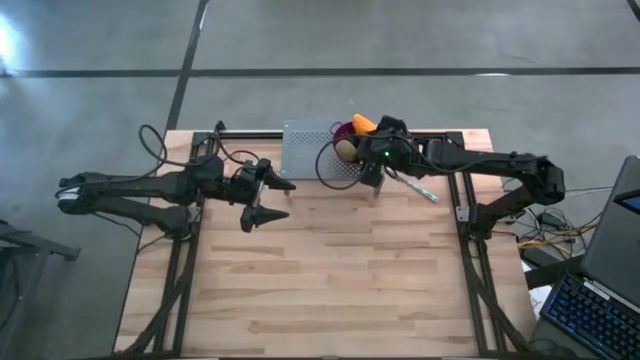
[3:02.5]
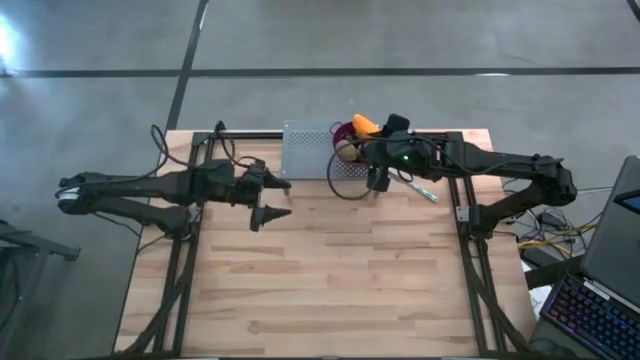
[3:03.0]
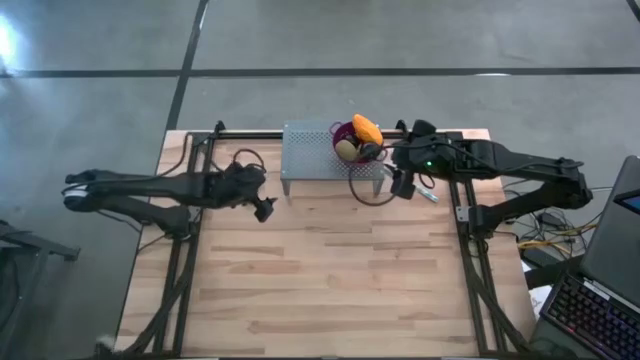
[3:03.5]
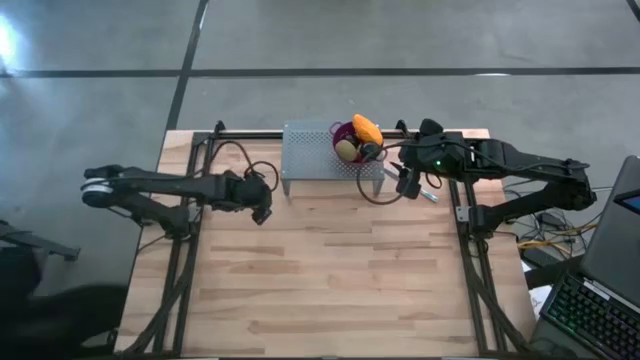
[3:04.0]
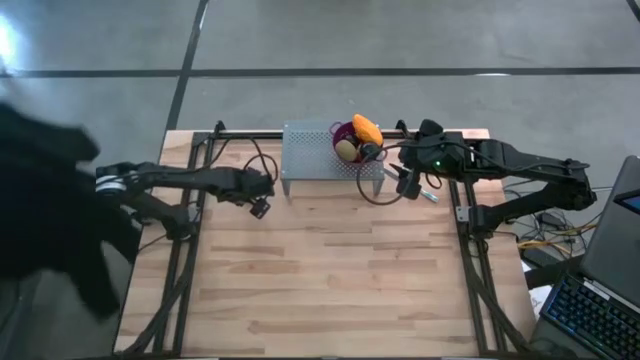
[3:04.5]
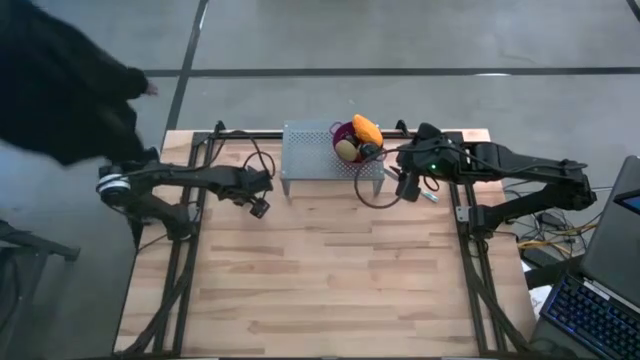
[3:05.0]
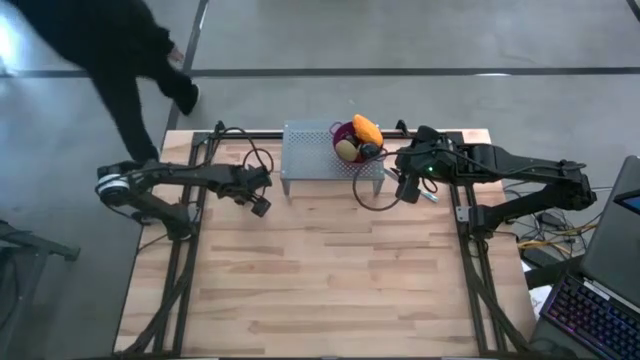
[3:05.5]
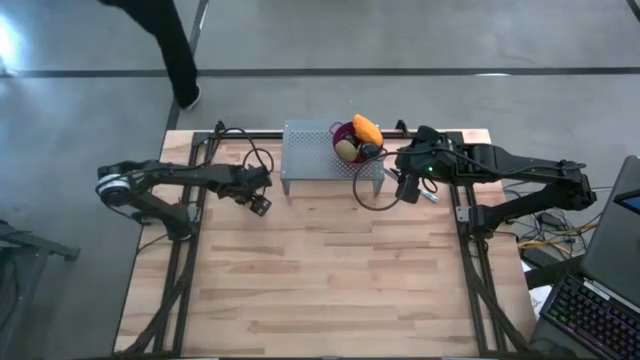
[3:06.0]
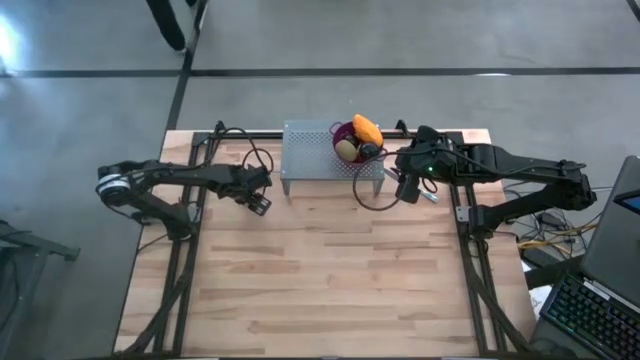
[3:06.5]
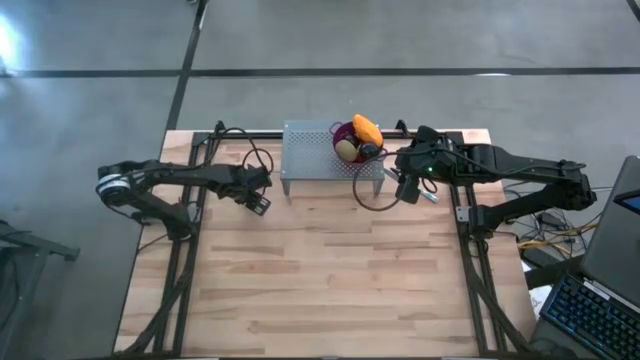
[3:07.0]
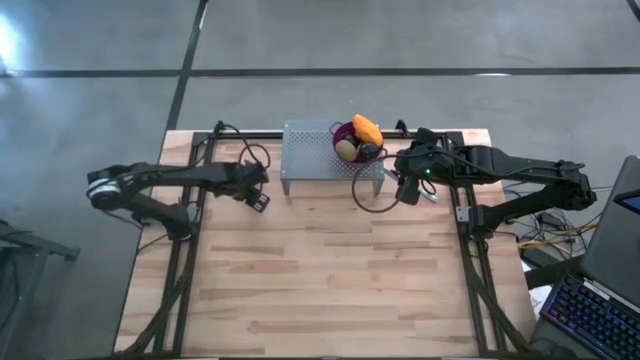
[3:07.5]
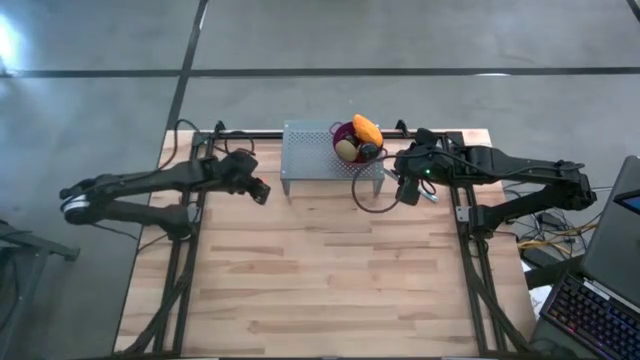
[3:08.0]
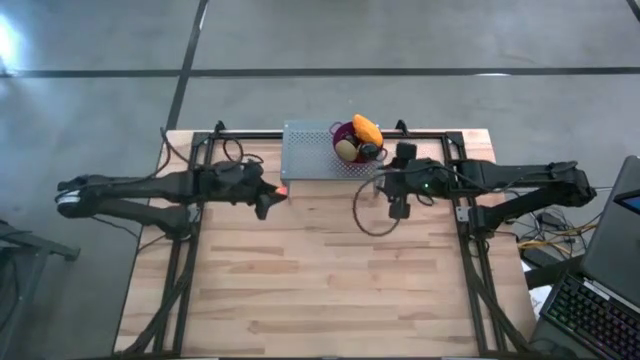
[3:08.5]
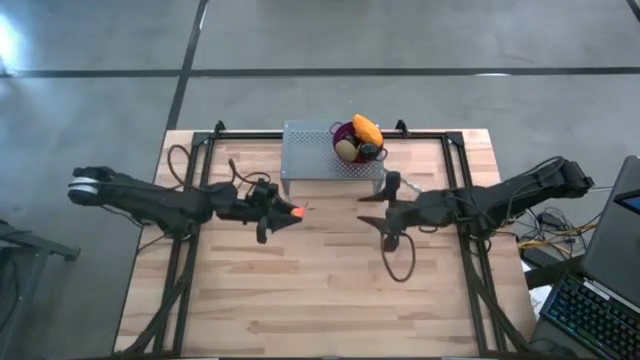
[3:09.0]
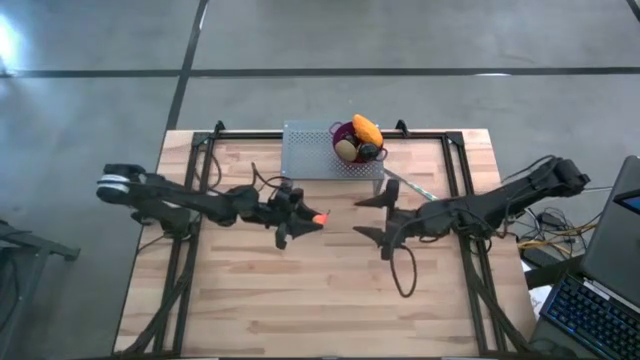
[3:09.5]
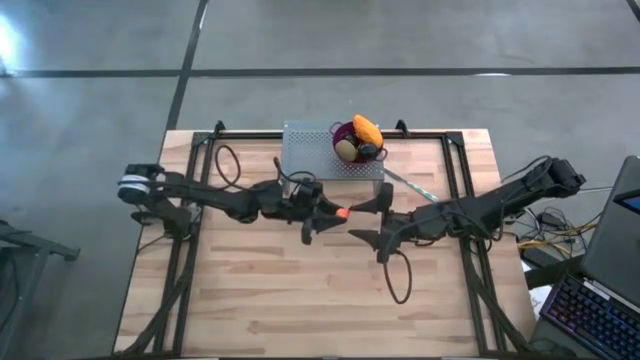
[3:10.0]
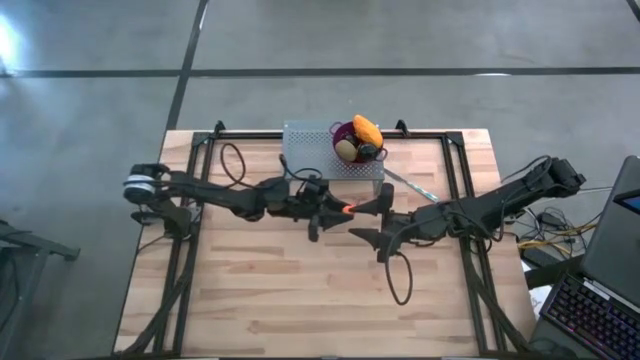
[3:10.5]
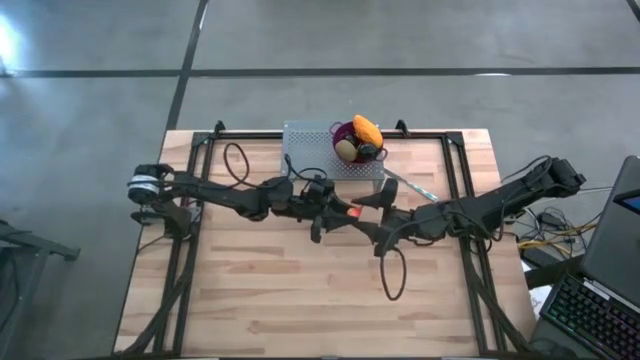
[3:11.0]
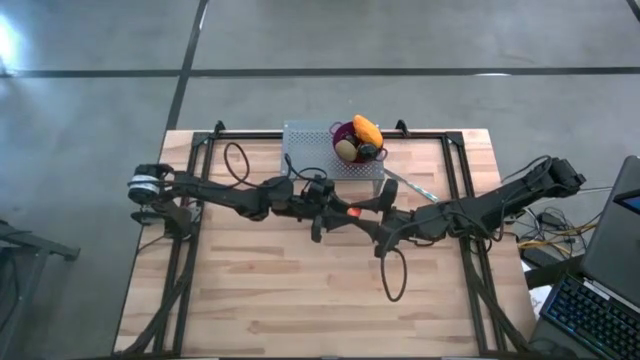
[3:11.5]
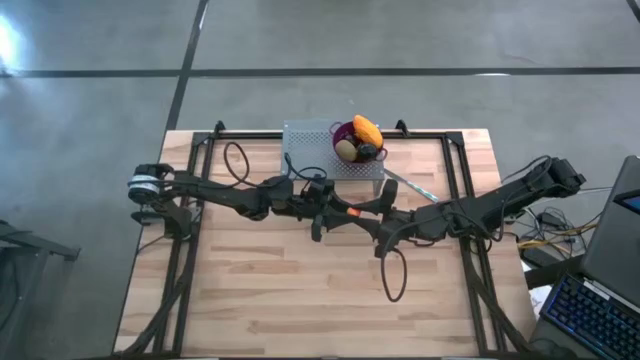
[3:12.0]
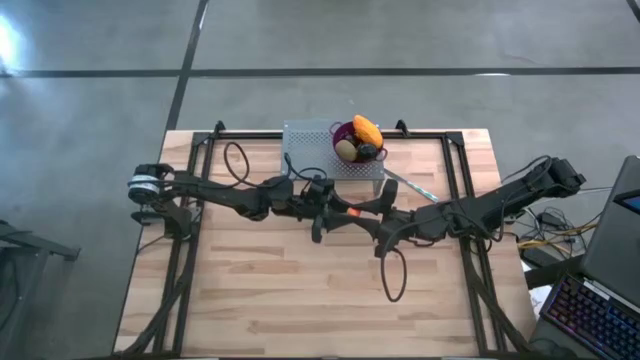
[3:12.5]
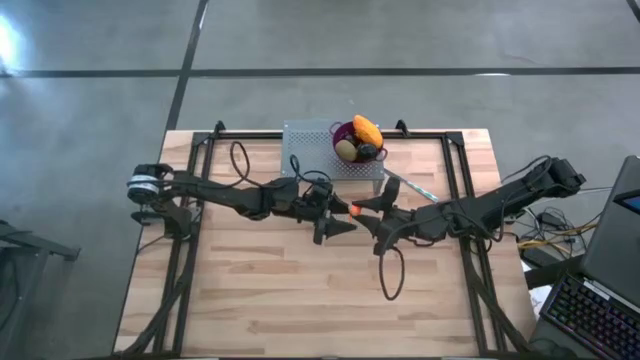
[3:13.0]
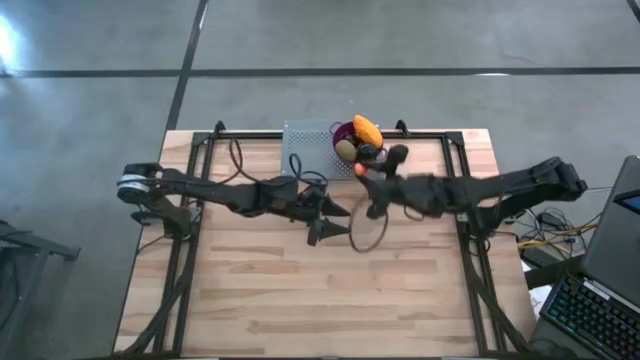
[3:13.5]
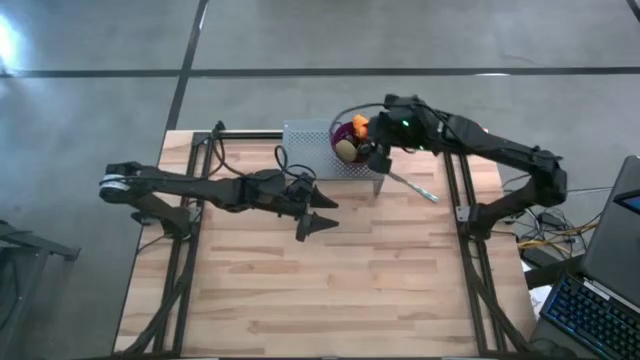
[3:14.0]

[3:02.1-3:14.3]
Task: Pick & Place Fruit
Put the pear into the purple strainer bowl on the shelf

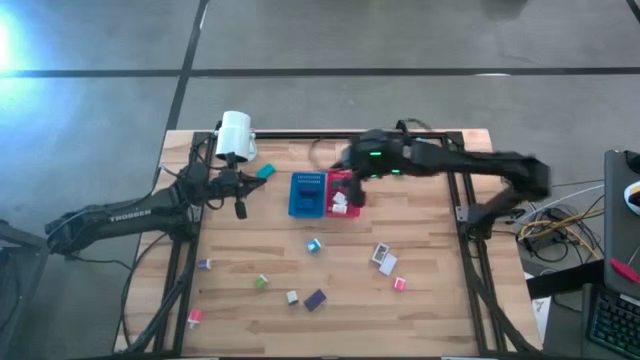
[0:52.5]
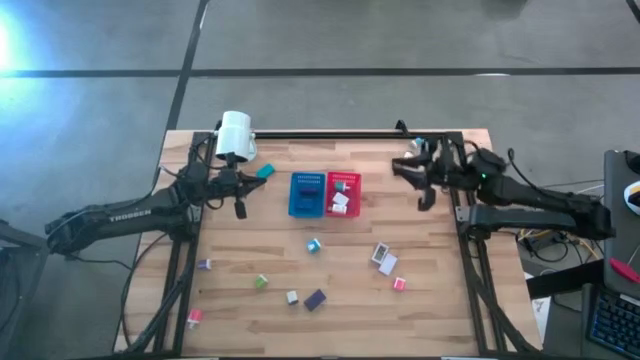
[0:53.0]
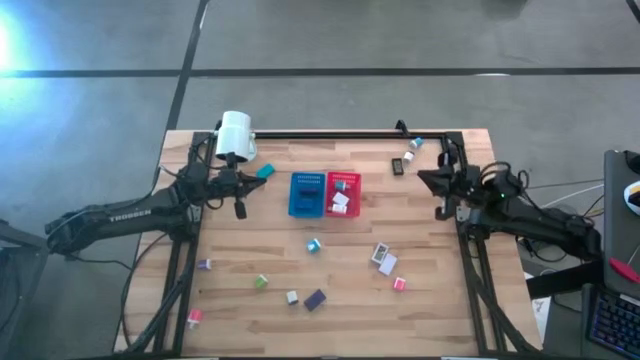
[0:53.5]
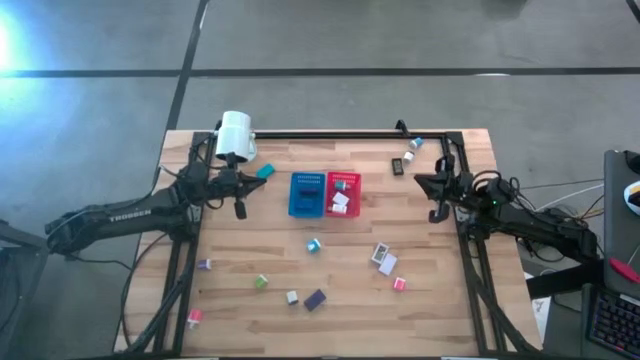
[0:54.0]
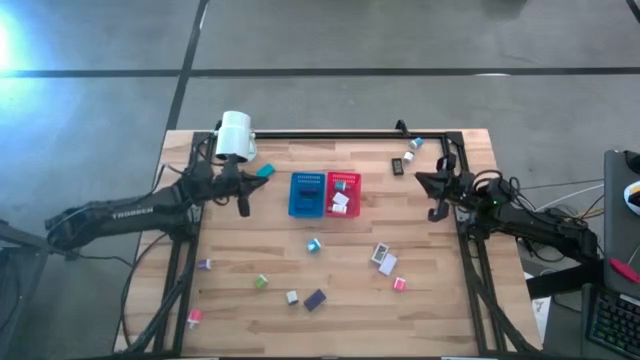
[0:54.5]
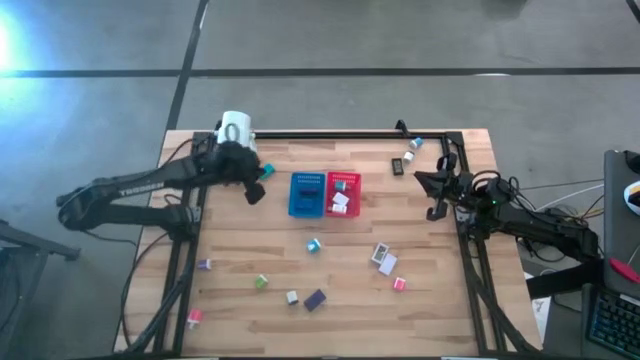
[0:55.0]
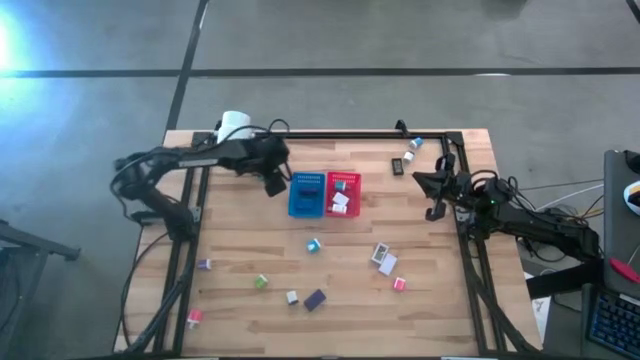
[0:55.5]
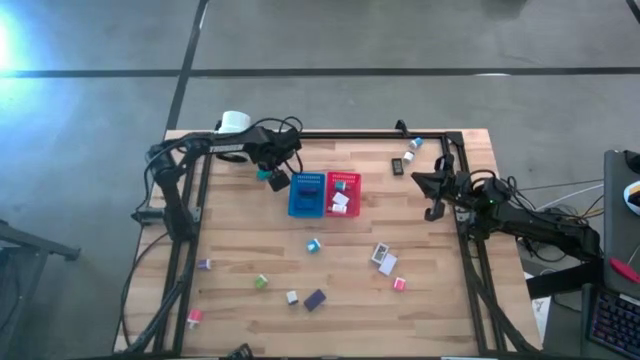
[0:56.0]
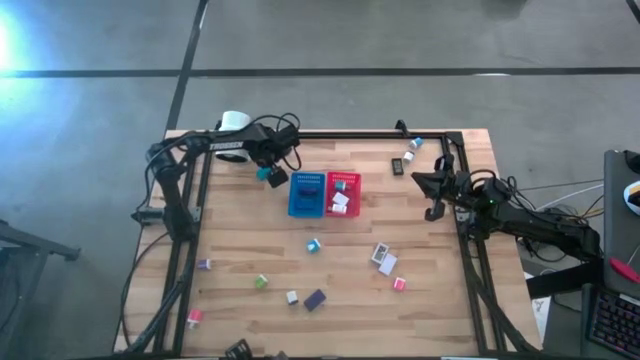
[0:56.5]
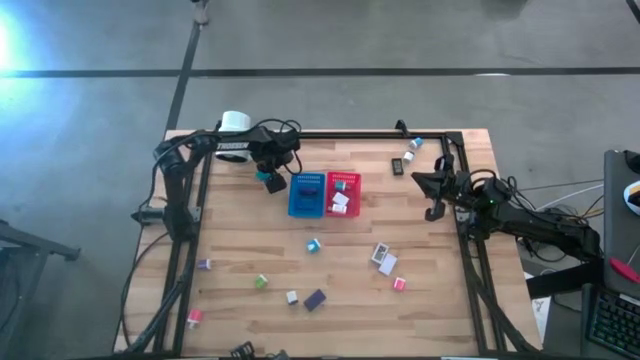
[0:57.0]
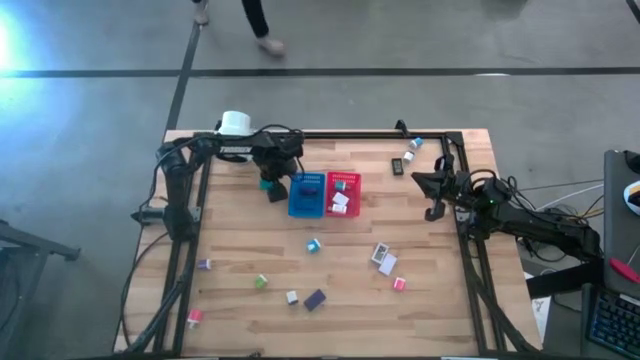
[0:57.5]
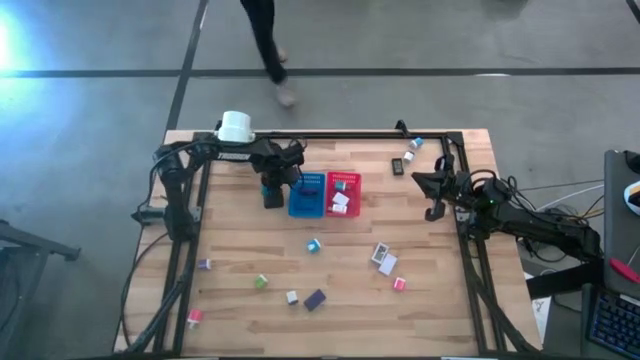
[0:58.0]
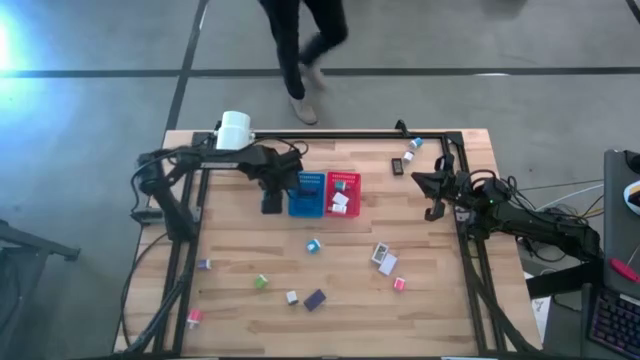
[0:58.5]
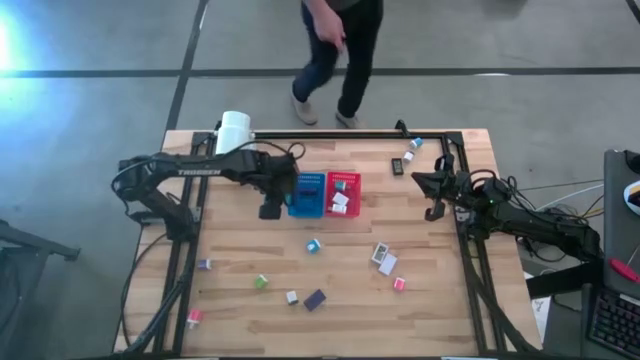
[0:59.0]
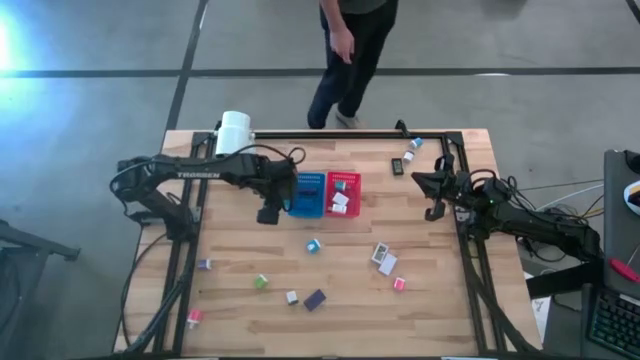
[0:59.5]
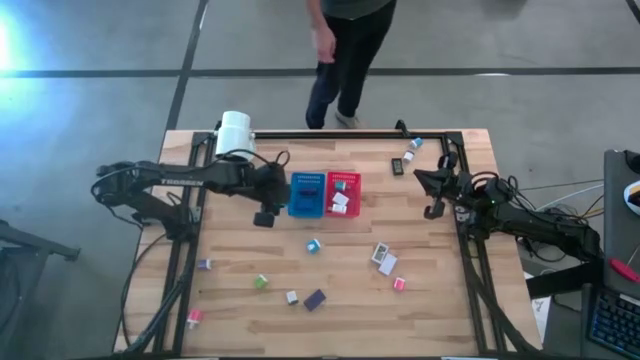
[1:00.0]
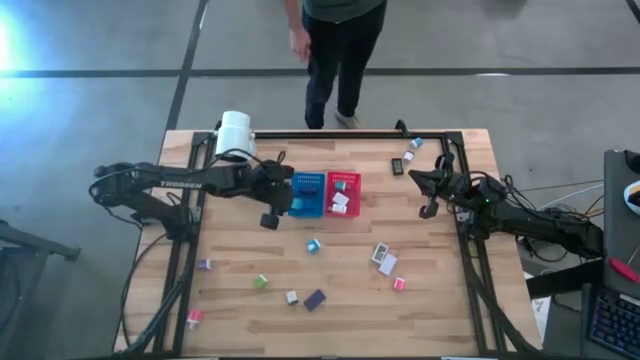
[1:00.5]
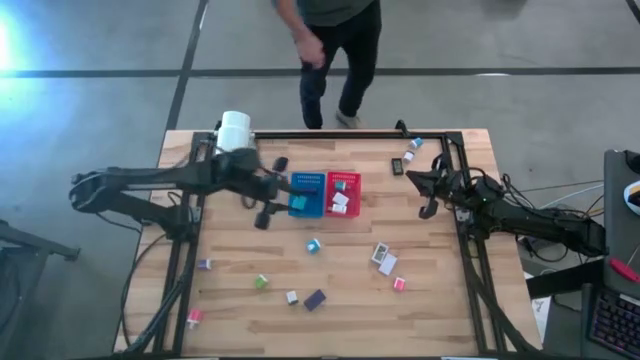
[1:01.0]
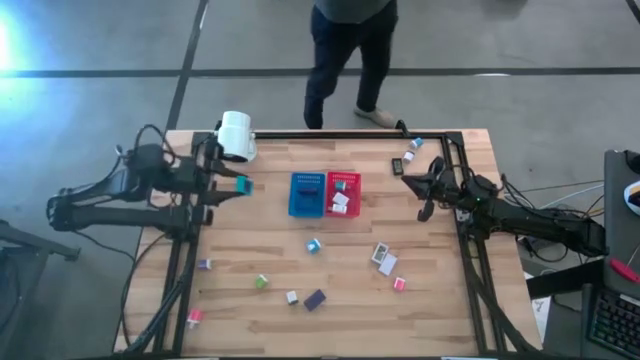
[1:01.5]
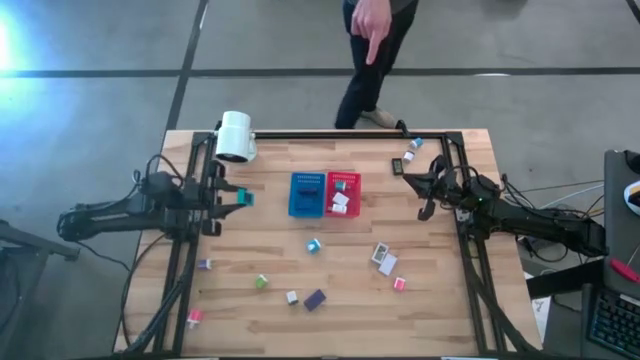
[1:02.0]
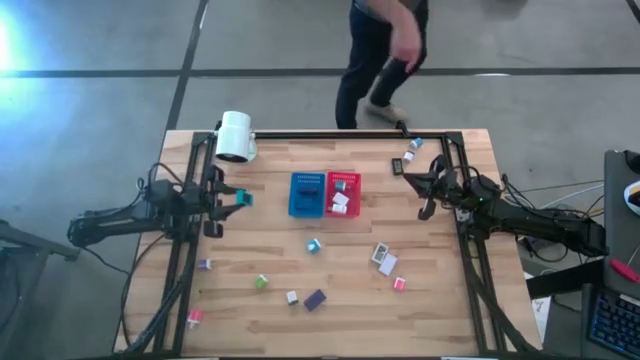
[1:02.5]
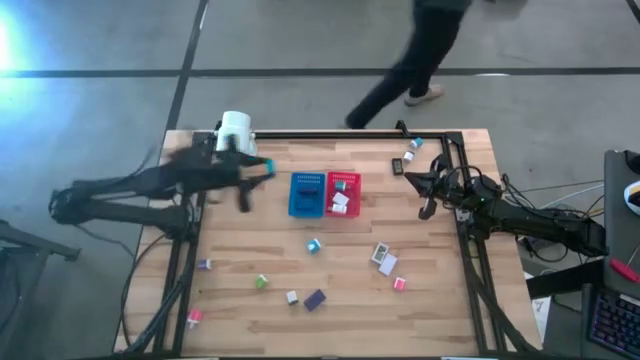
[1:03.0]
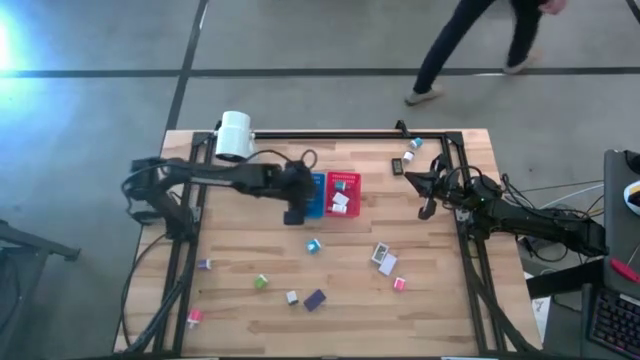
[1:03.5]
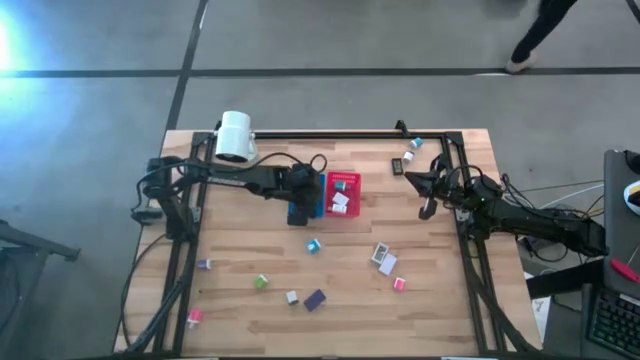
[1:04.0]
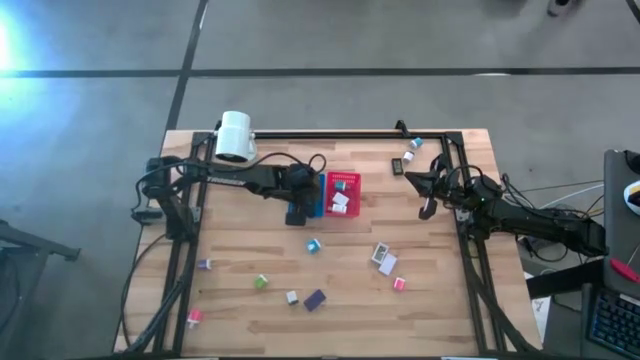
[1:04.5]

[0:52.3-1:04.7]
Task: Pick & Place Office items
Put the light blue digital clock into the blue bin
